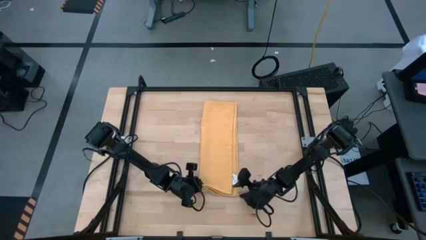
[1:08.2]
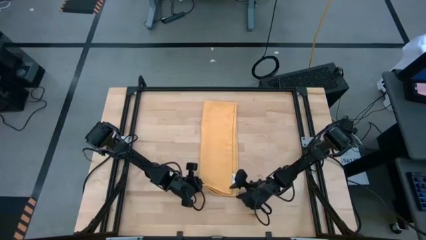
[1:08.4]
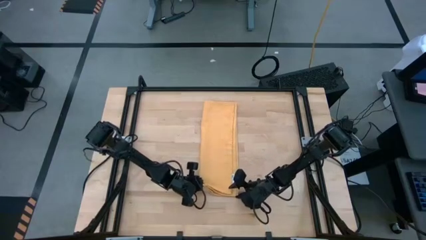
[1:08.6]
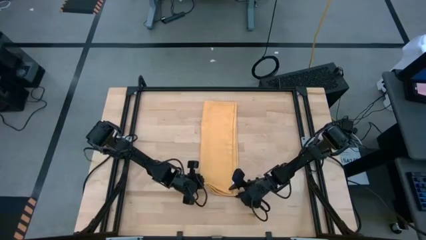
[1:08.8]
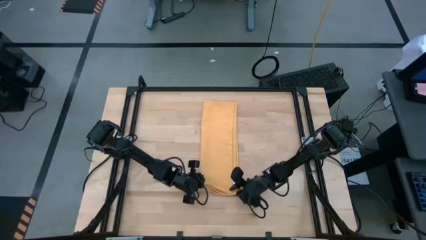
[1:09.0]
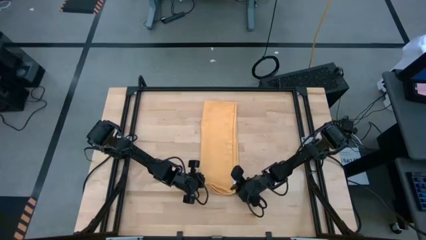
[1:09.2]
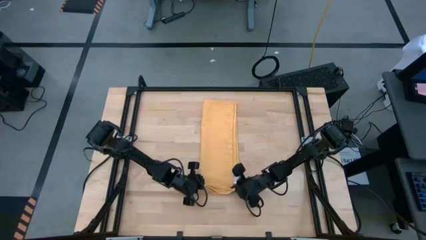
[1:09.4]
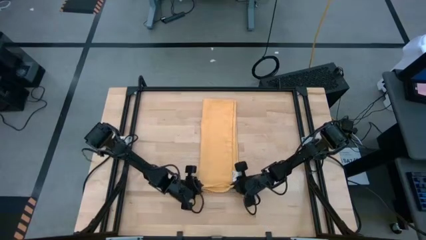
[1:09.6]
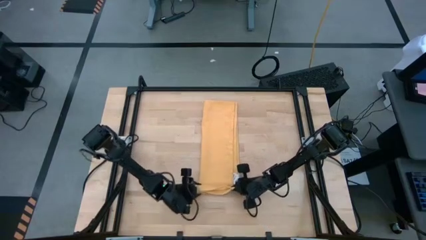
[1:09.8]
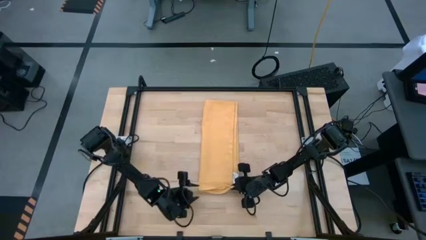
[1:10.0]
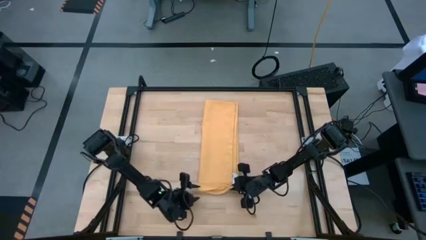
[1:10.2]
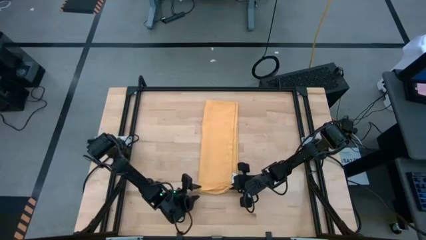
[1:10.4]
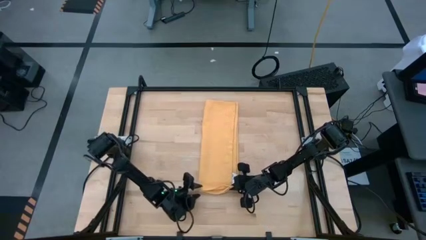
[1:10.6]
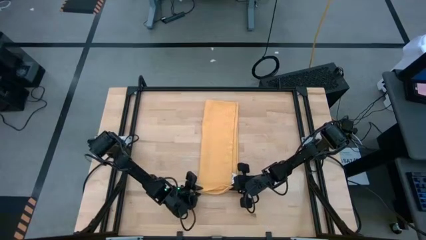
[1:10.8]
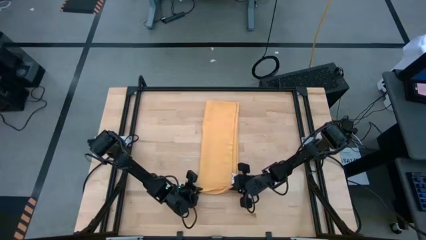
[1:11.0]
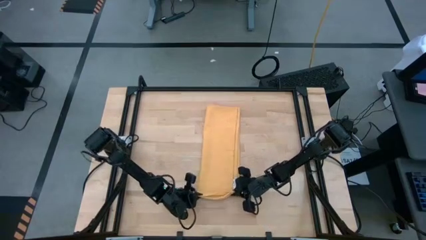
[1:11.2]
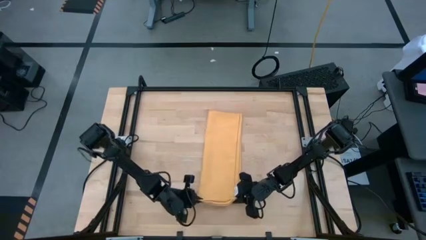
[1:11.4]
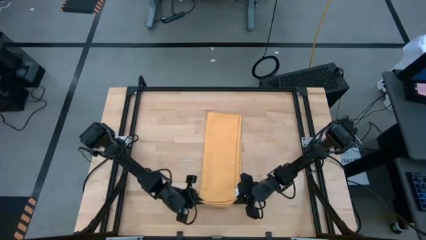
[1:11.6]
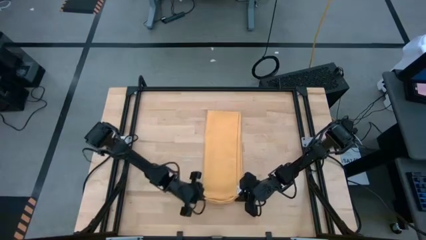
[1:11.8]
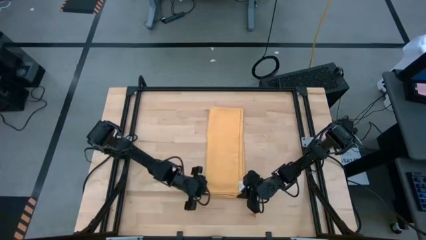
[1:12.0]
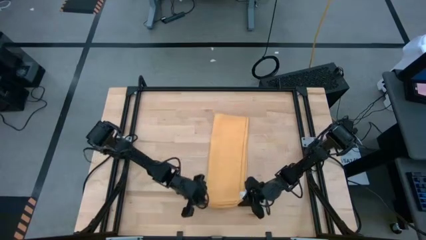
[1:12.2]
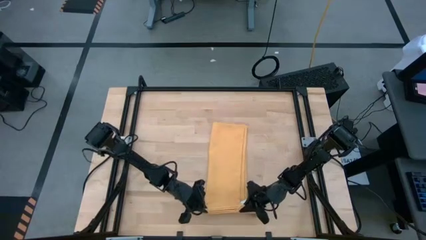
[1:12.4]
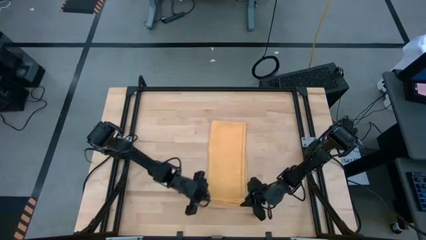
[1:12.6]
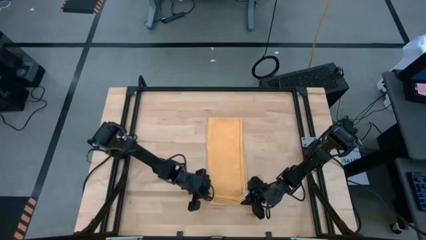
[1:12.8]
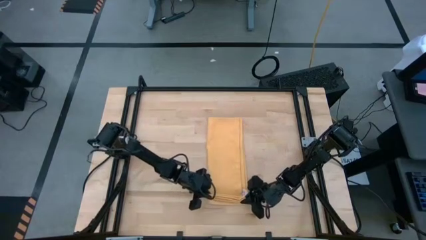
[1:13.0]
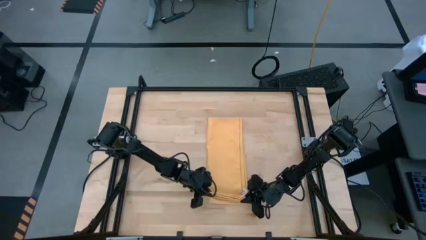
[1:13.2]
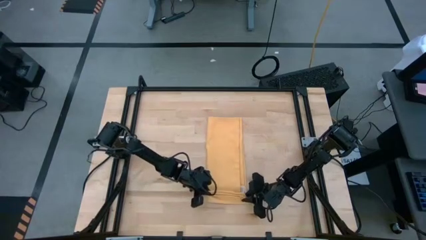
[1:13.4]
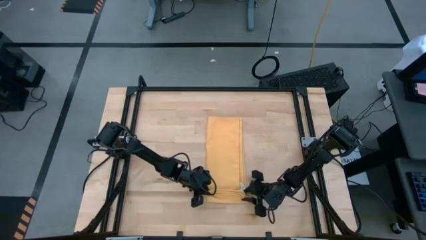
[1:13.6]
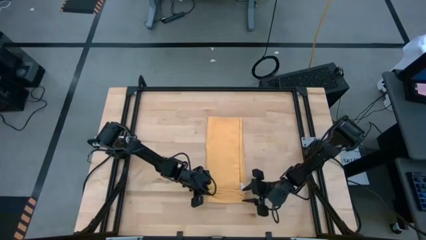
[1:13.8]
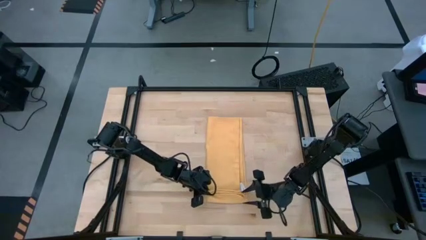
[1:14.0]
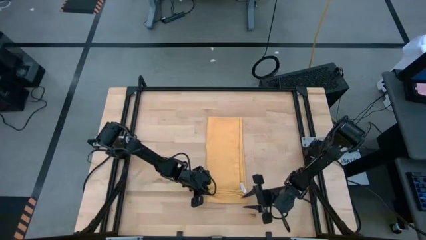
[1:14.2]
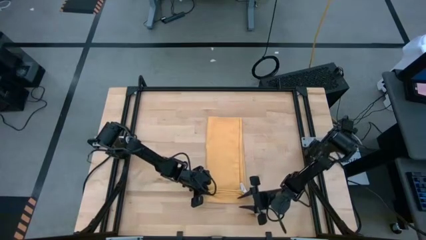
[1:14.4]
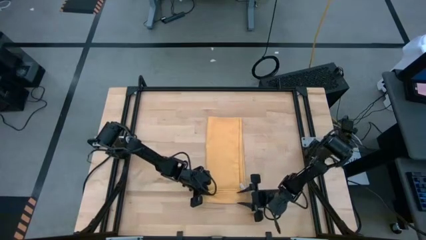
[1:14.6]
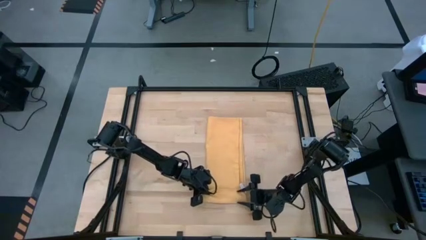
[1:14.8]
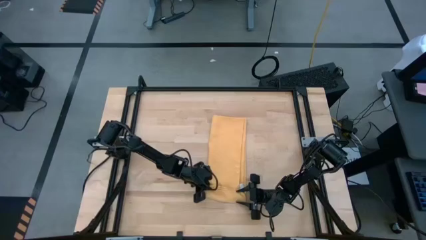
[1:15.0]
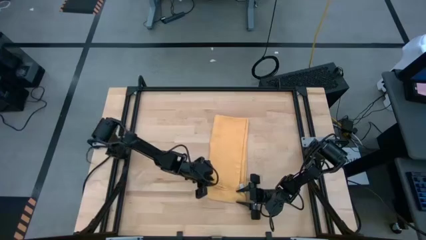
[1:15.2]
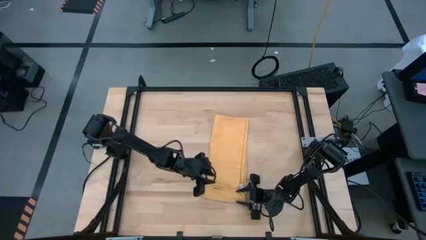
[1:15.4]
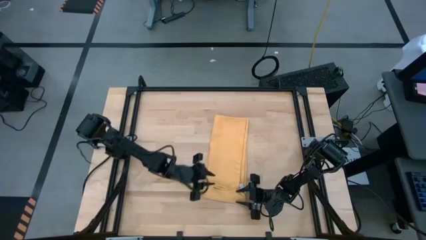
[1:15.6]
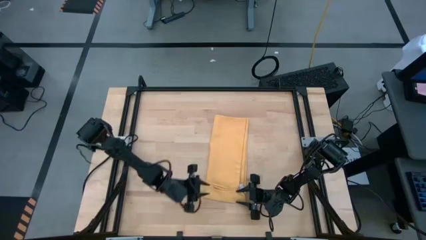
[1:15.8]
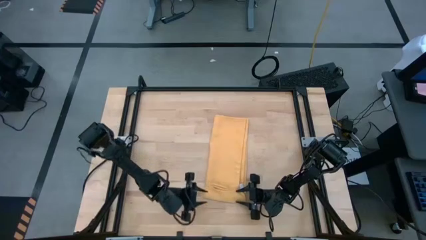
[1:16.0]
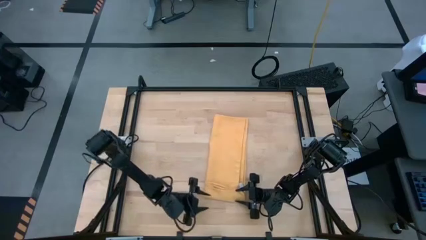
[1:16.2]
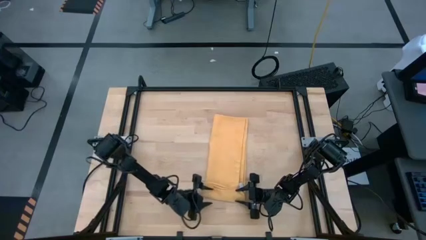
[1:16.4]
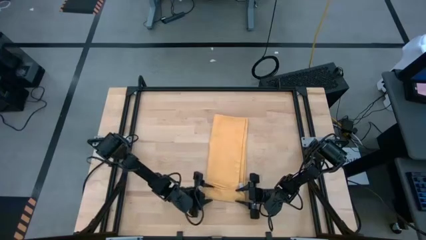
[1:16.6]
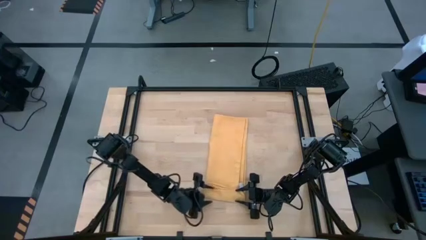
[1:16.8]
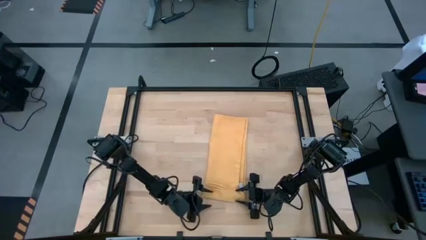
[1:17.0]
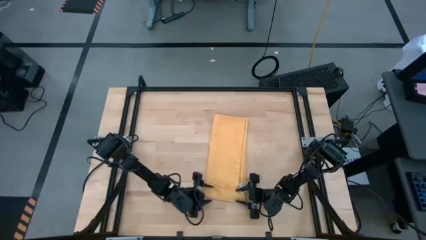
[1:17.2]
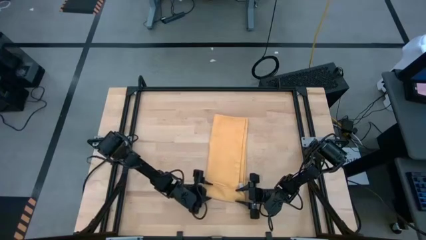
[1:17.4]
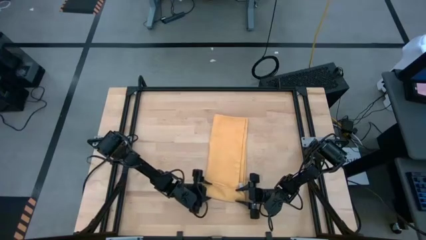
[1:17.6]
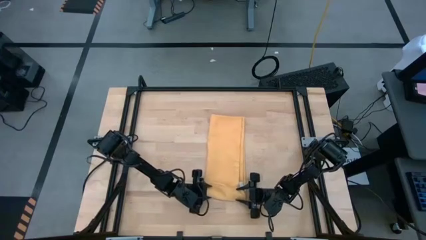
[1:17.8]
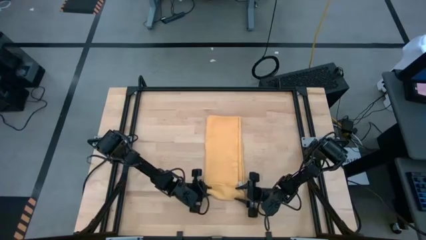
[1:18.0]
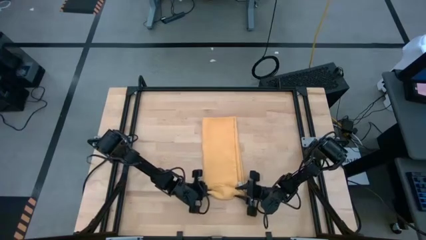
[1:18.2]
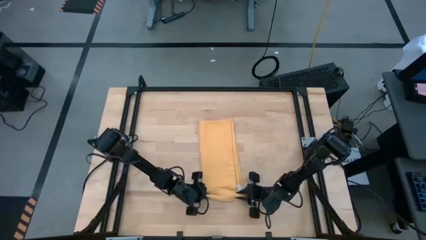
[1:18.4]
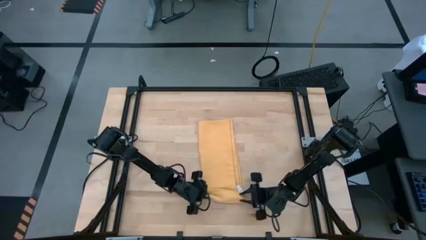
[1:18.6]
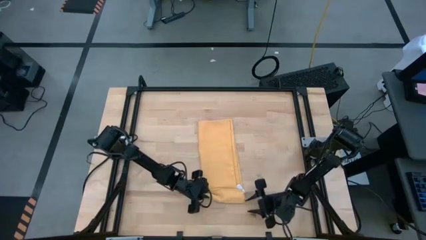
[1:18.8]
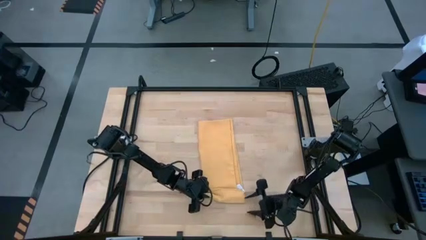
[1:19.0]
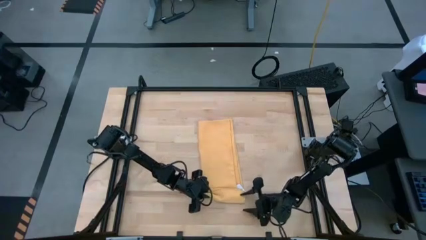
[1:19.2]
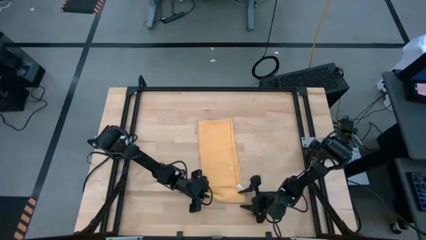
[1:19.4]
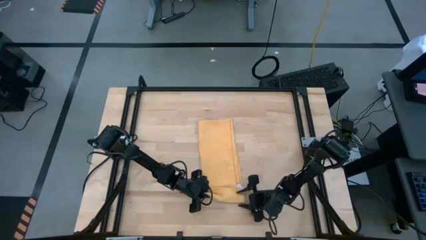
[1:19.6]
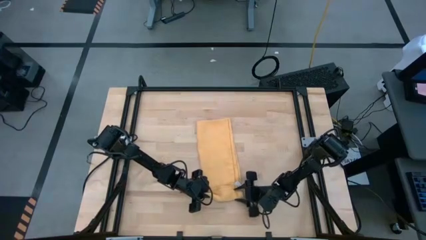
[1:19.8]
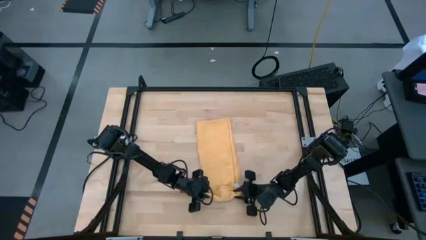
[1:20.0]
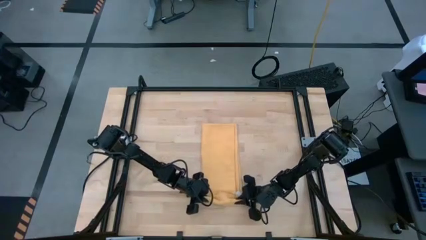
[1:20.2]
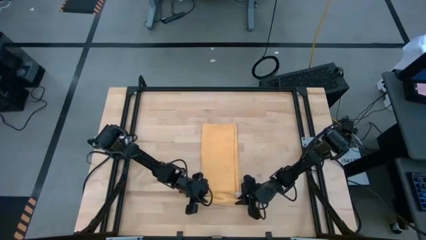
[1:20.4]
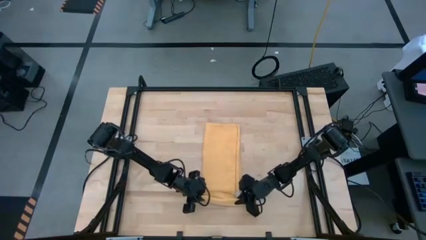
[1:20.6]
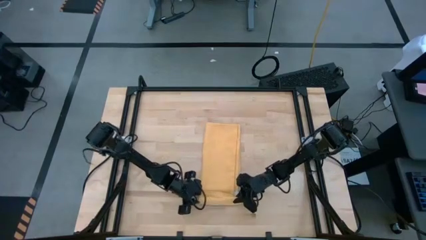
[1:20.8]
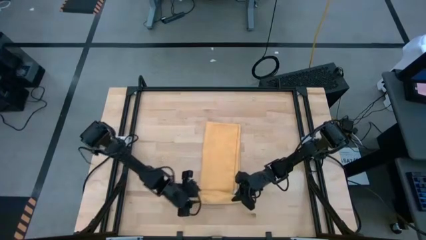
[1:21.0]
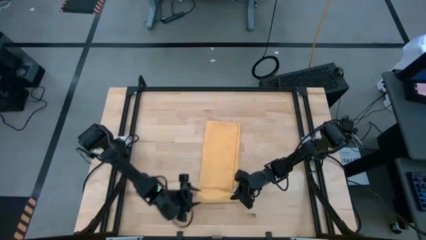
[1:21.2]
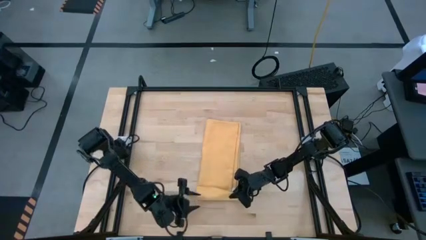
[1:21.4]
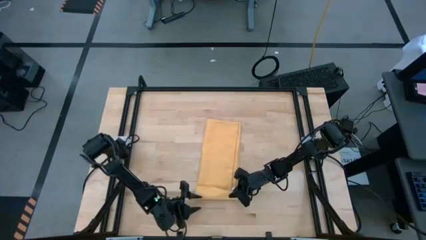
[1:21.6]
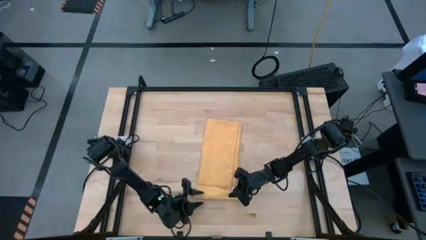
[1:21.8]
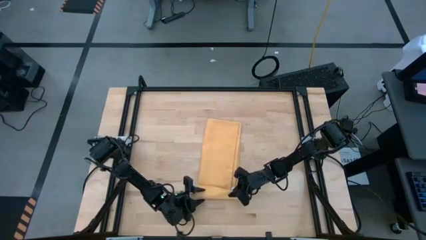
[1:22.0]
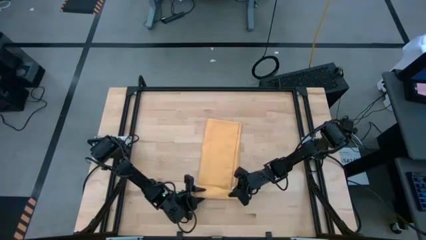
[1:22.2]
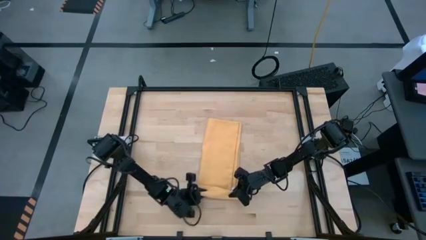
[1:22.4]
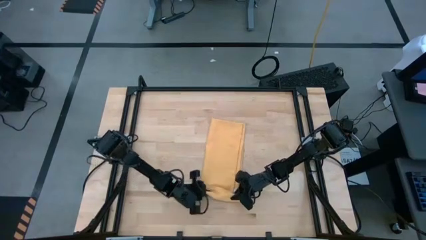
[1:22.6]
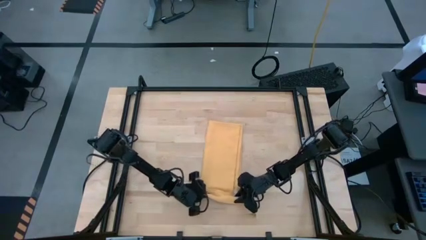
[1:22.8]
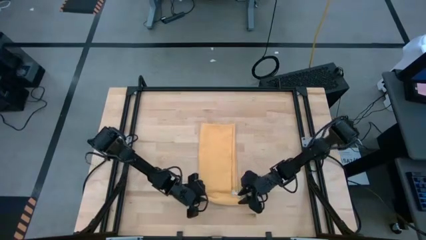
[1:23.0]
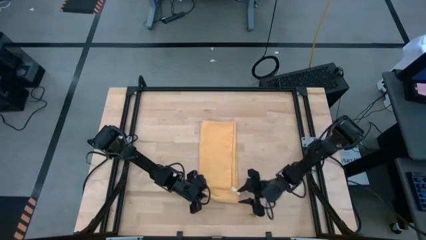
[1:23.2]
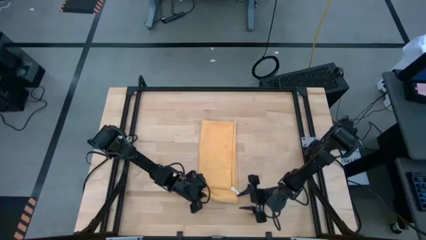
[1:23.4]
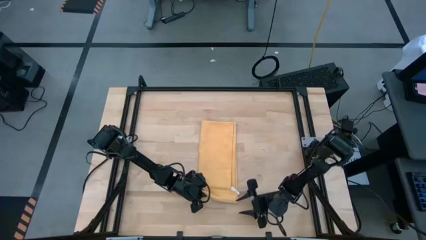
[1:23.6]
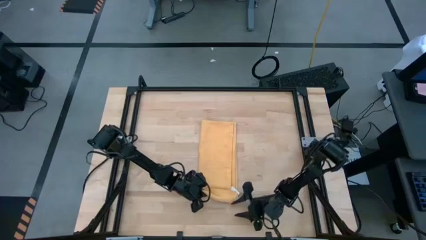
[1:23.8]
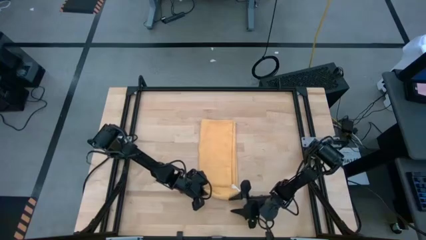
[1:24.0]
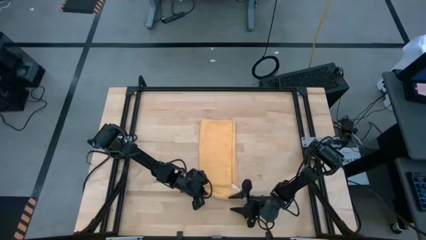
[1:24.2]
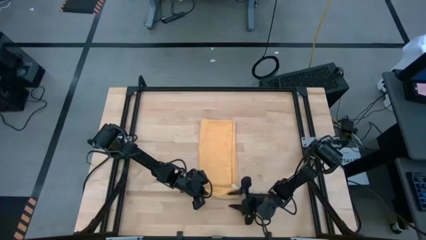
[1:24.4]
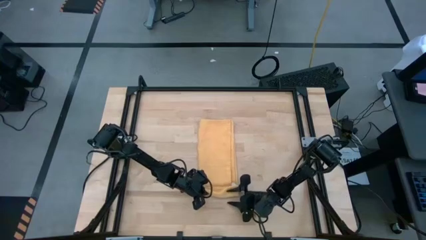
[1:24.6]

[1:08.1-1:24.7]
Task: Roll towel
Roll the yellow towel
